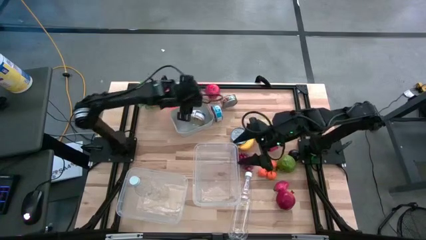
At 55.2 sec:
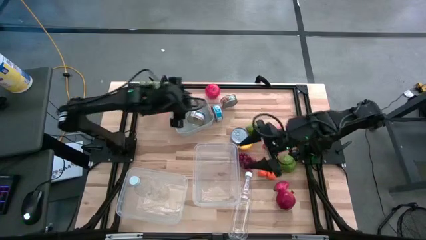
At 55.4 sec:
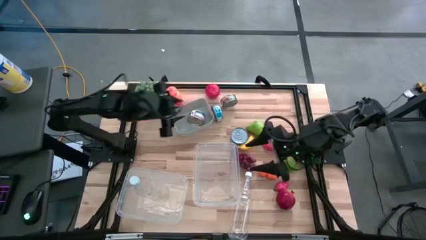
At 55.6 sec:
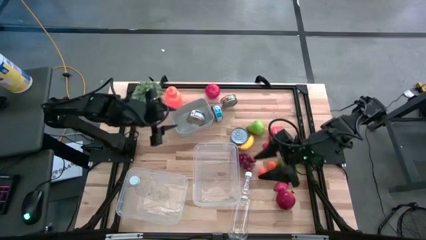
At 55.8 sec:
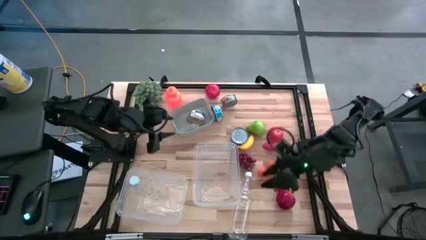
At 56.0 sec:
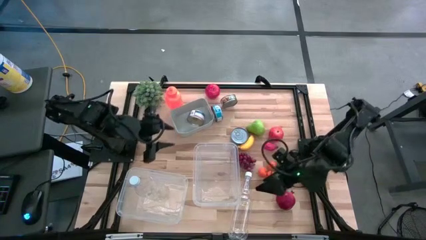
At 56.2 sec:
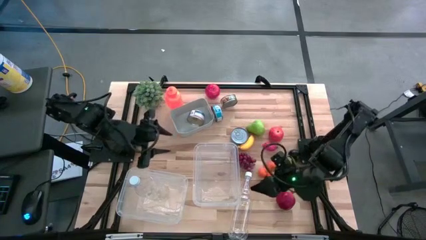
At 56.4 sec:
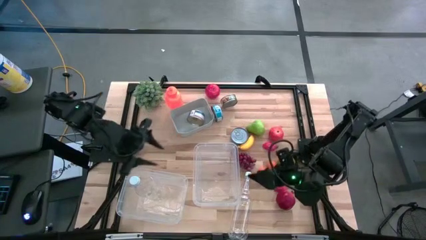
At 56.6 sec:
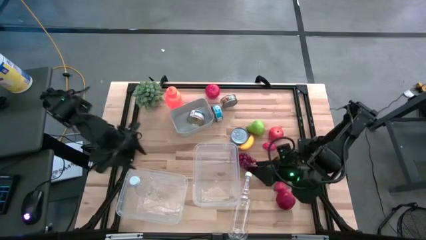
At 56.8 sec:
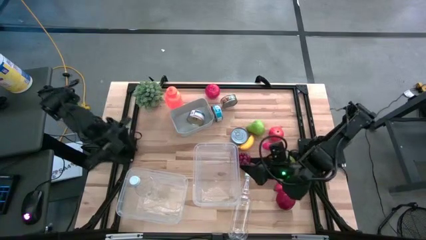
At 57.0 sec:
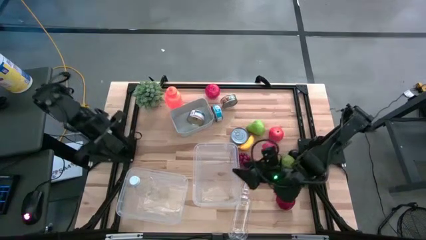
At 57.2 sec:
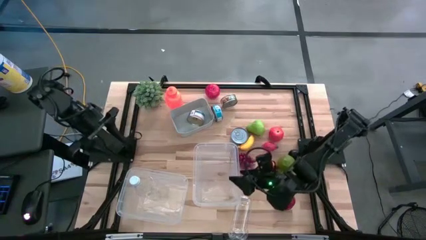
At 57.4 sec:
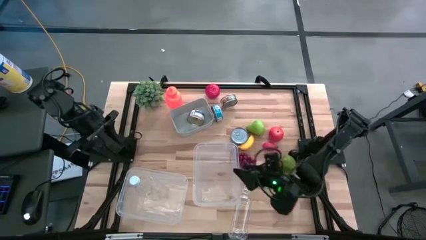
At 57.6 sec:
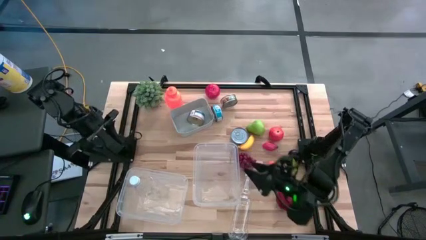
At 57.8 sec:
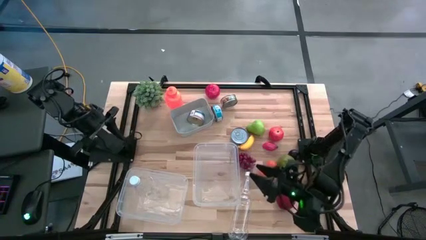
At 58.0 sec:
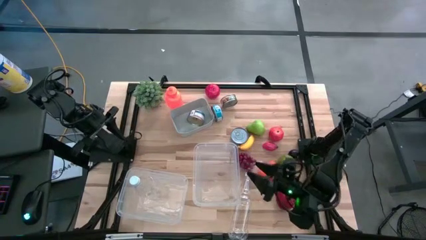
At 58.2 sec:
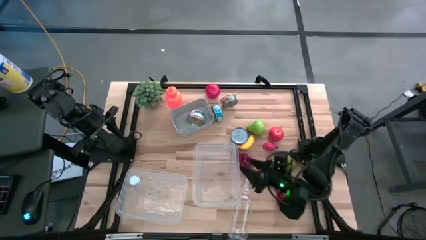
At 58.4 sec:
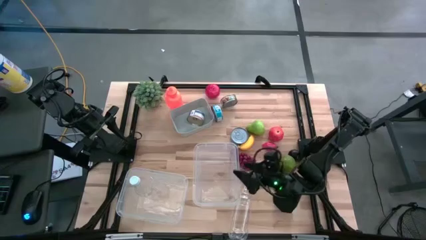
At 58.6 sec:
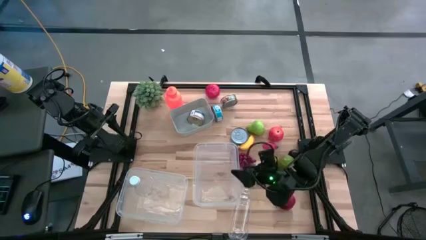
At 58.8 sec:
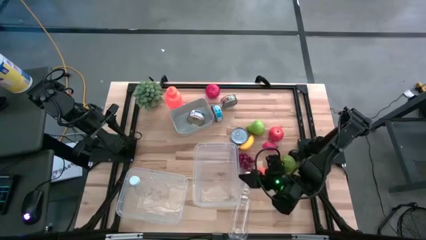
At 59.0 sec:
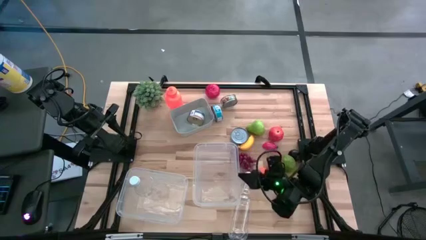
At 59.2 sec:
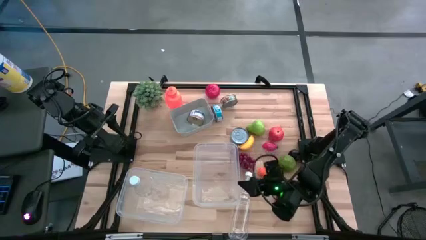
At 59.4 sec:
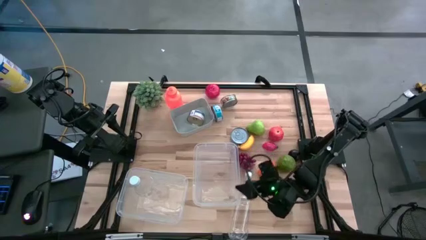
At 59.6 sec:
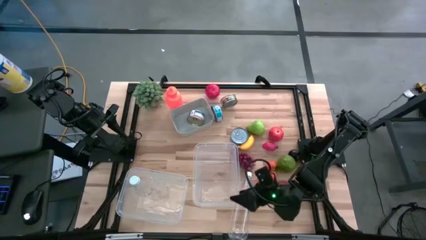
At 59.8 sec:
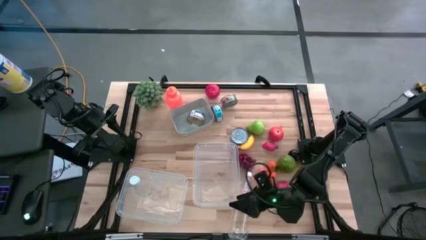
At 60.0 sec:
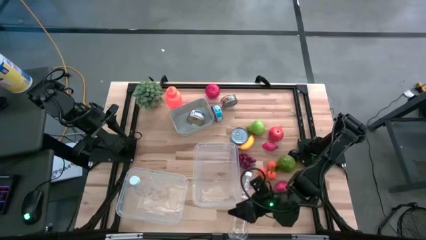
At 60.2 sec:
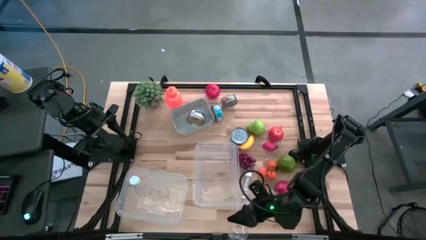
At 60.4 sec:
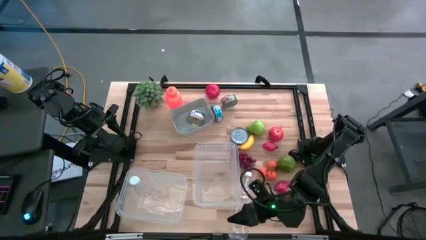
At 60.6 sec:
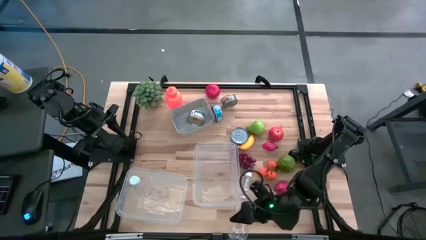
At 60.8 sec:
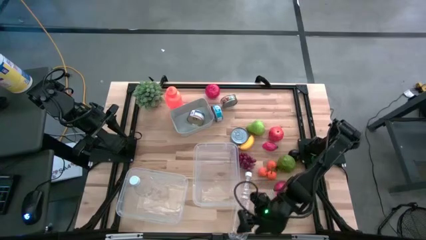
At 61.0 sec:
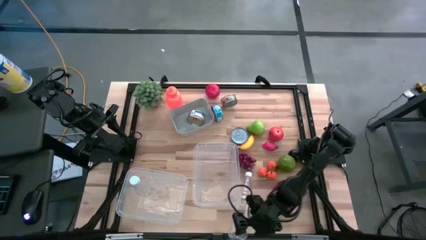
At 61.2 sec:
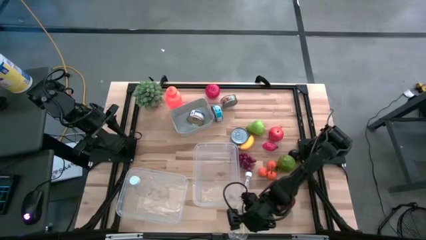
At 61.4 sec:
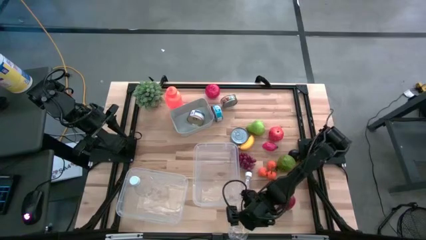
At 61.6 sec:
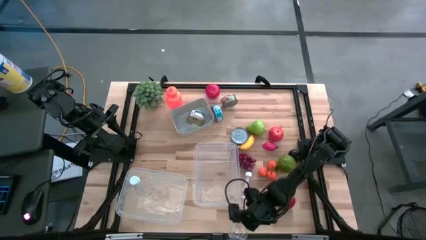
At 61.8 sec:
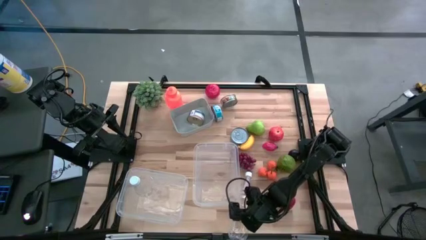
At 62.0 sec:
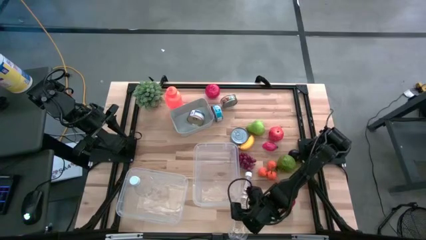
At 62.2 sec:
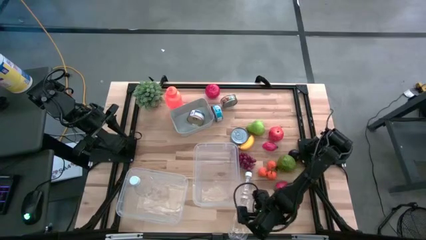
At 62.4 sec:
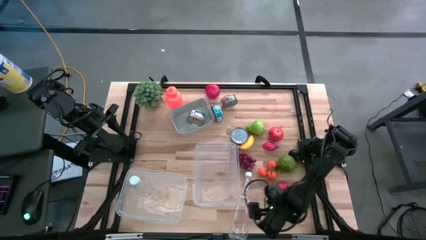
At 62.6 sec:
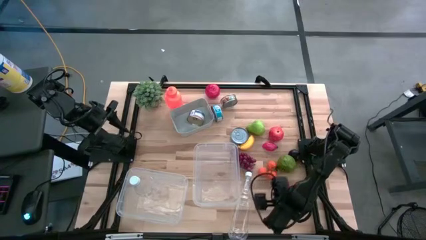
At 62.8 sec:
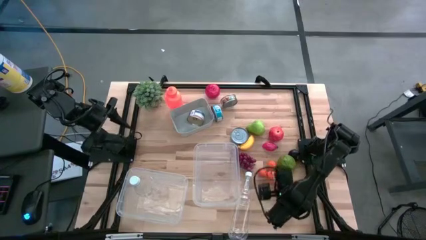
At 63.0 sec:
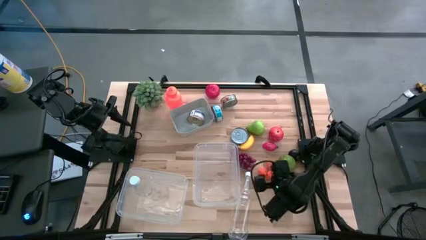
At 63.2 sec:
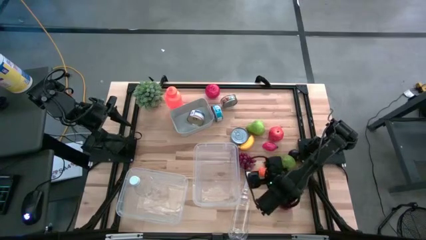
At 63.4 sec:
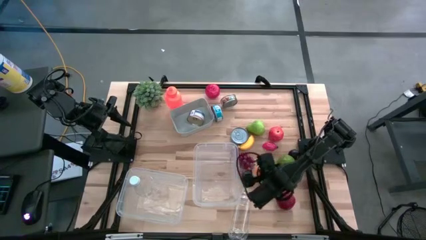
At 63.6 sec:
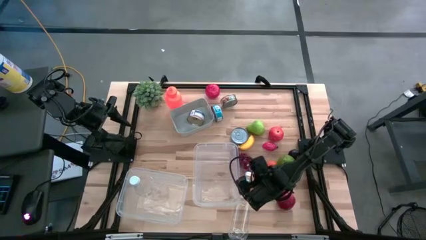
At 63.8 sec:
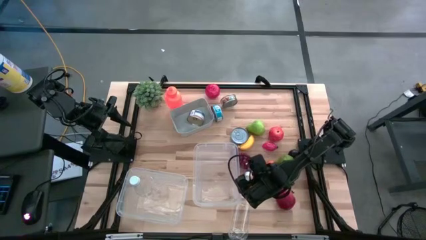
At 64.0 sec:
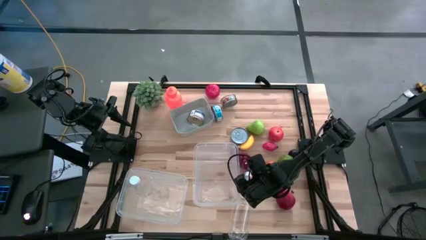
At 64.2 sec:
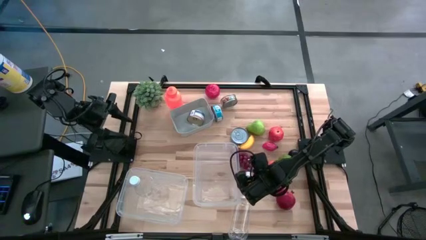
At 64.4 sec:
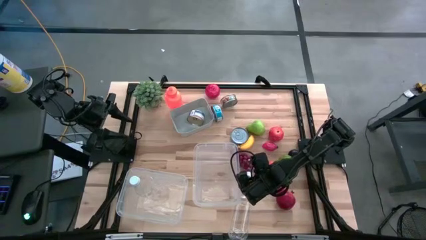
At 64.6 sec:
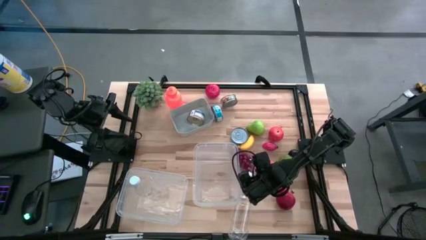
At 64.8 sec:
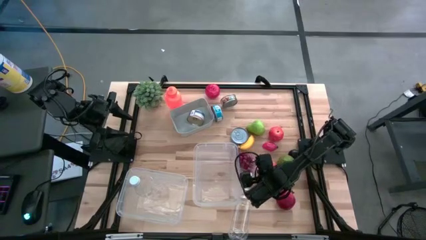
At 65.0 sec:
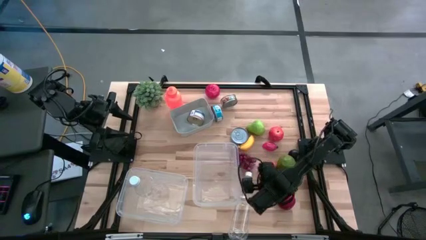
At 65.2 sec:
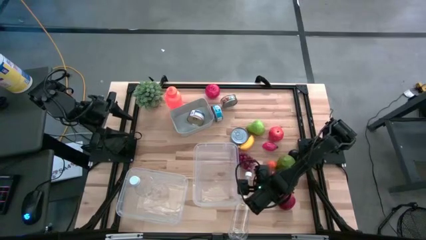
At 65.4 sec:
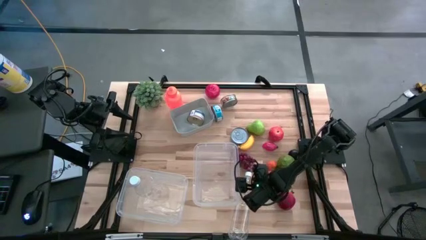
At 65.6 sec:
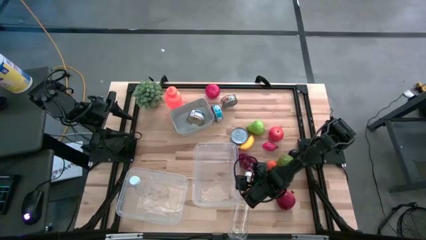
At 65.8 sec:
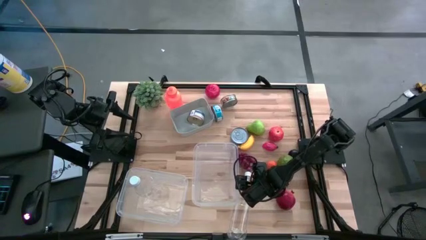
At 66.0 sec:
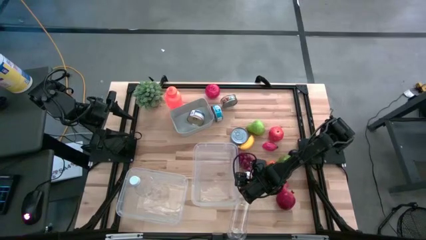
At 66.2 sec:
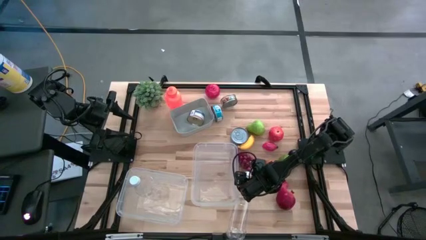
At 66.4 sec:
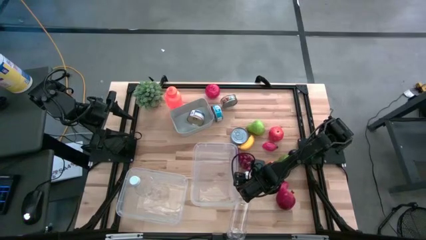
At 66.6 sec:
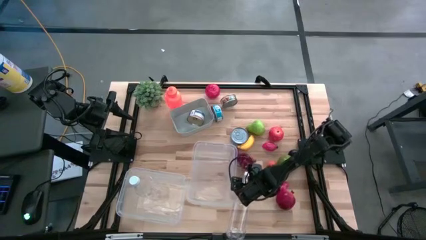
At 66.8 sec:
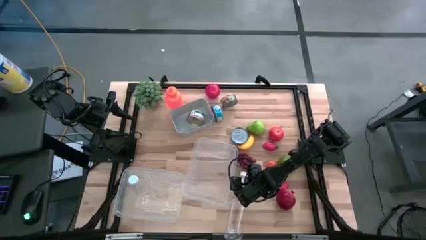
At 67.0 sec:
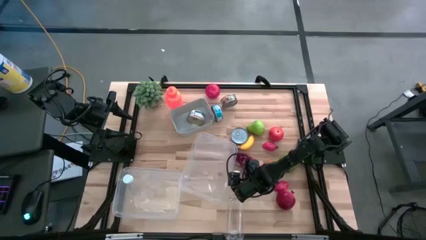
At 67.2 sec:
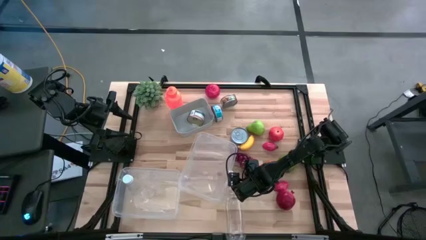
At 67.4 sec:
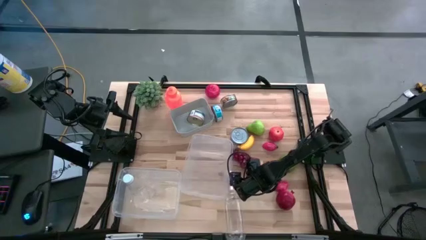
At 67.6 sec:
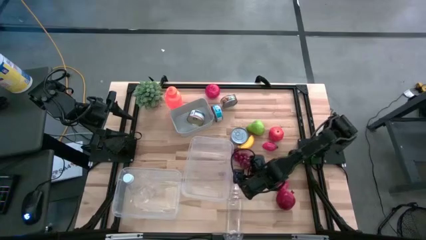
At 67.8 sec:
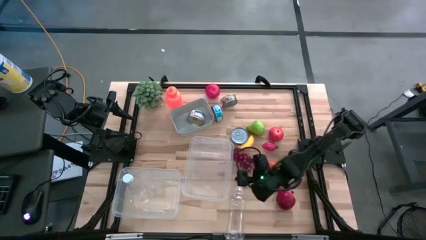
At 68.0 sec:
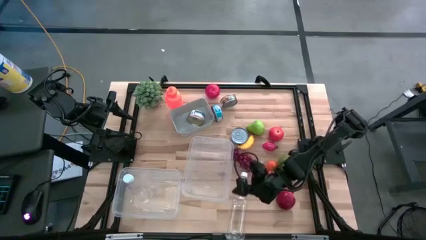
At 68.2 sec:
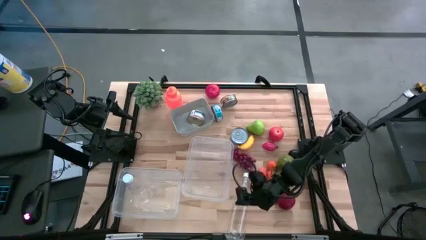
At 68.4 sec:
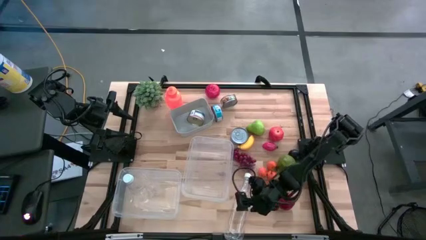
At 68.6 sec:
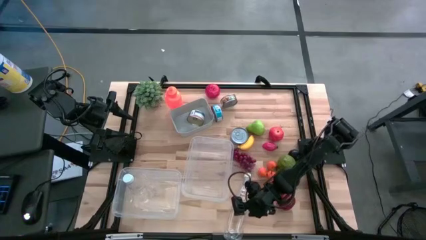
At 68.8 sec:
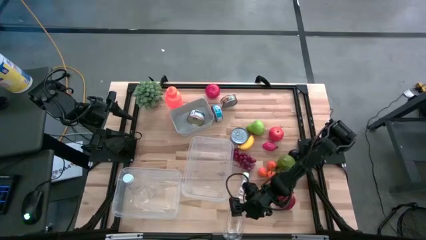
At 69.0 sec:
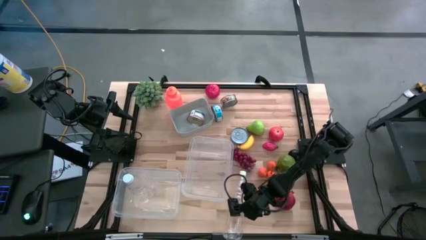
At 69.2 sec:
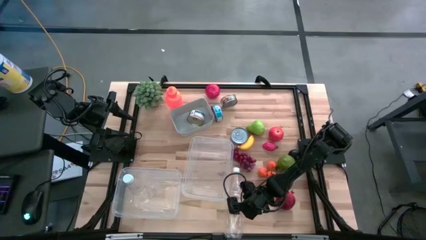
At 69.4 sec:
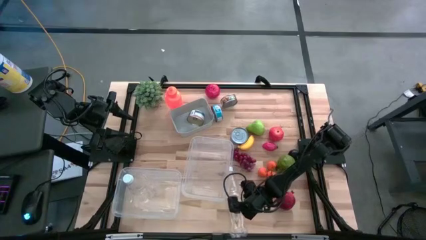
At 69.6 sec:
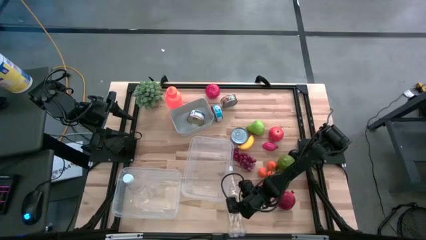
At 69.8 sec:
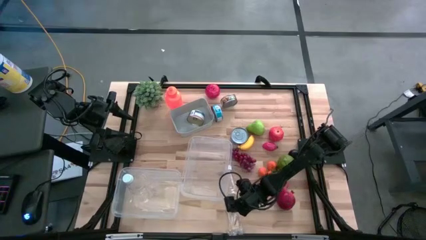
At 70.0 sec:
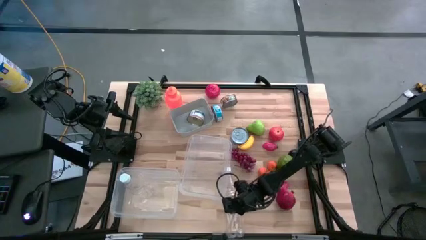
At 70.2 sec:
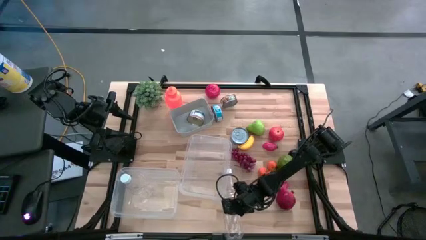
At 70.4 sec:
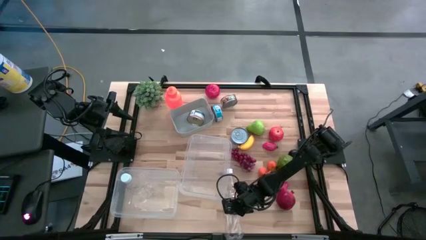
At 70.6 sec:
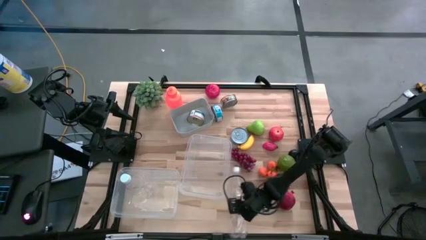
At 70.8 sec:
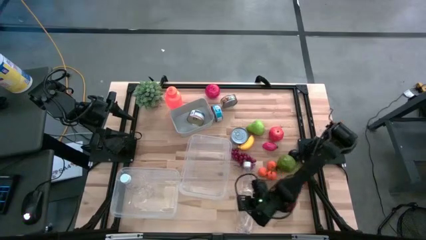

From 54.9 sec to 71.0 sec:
Task: Pick & Place Food Item
Put the transparent plastic bottle into the left transparent bin

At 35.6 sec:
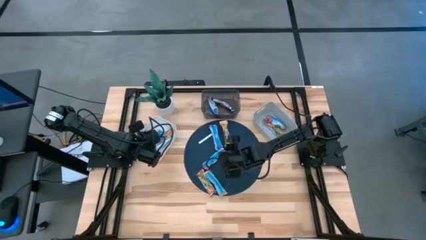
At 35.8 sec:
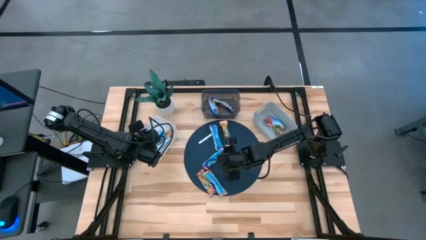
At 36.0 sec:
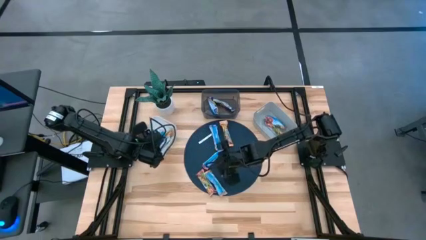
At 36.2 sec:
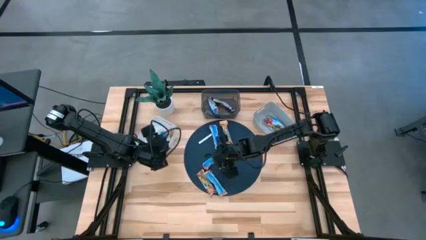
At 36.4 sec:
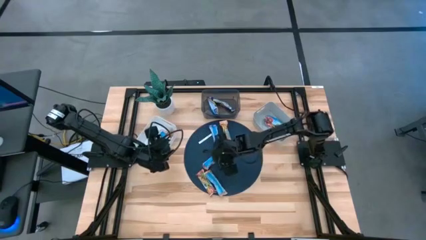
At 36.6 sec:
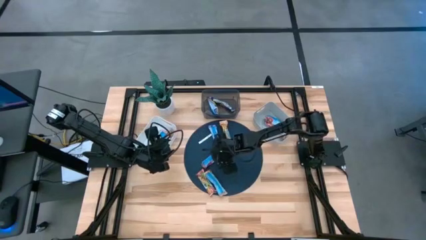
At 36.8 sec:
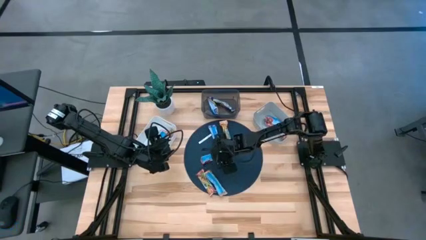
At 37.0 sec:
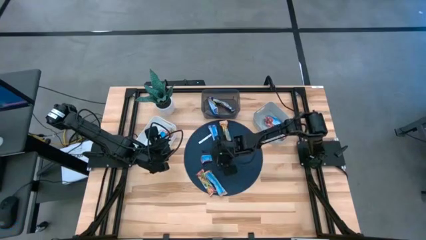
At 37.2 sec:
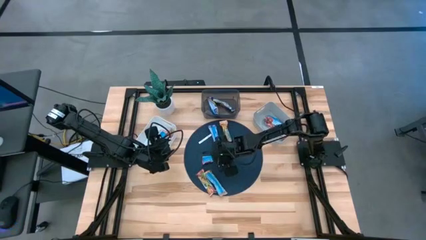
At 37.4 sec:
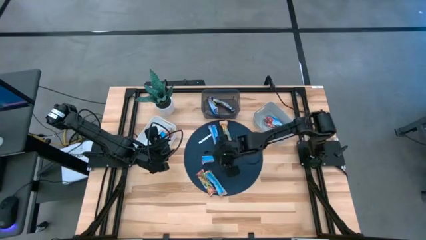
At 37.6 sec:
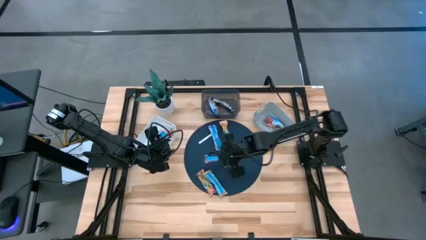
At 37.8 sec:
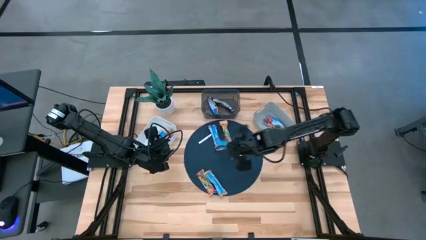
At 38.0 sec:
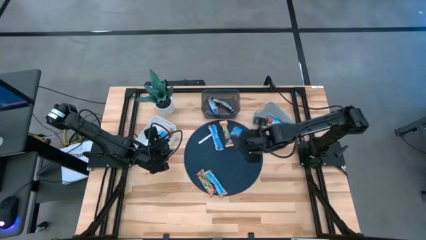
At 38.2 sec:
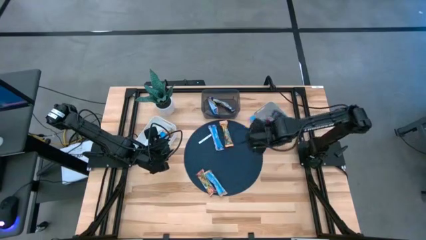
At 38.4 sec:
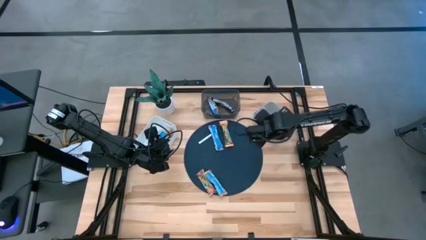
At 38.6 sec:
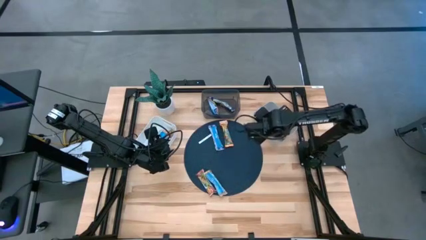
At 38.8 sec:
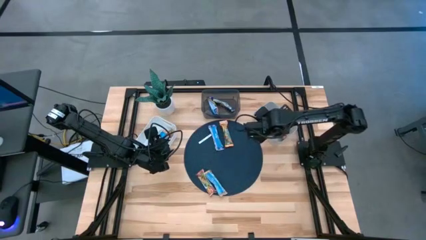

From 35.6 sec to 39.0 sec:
Task: Pick and place Granola Bars by type
Put the red granola bar into the gray bin
